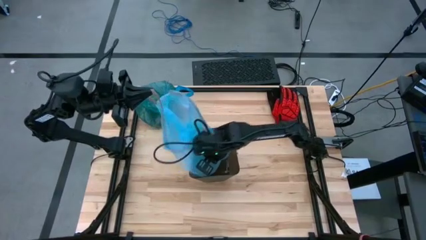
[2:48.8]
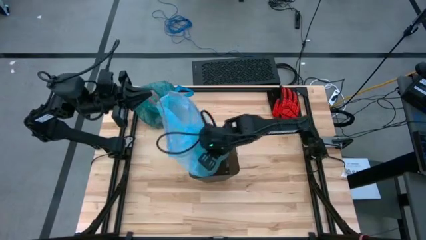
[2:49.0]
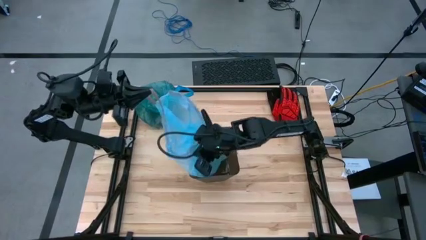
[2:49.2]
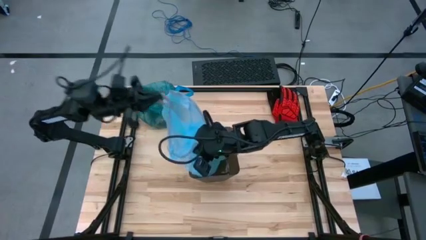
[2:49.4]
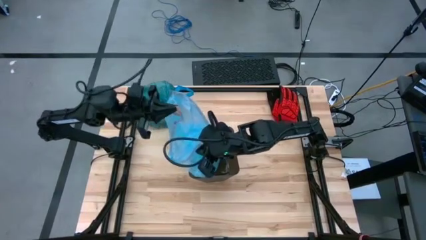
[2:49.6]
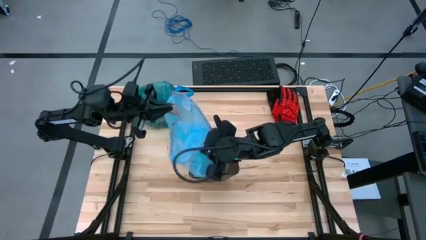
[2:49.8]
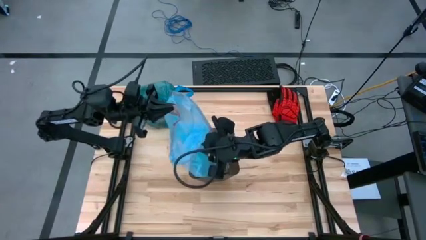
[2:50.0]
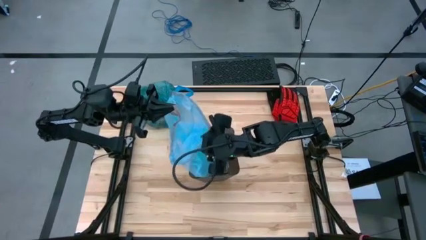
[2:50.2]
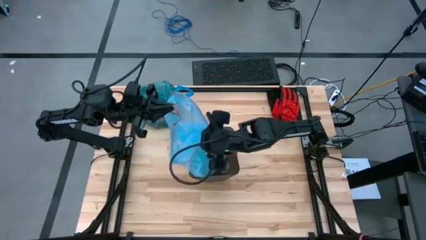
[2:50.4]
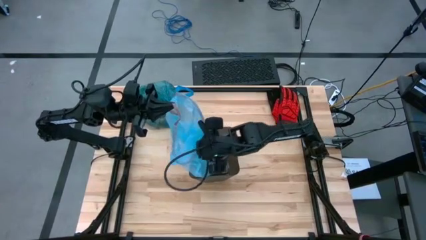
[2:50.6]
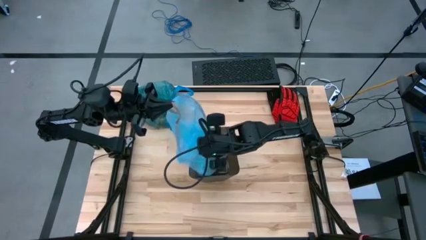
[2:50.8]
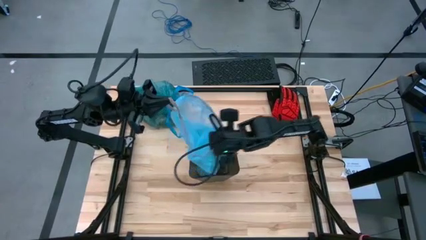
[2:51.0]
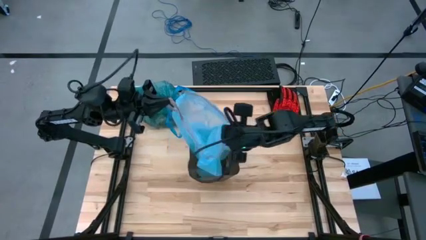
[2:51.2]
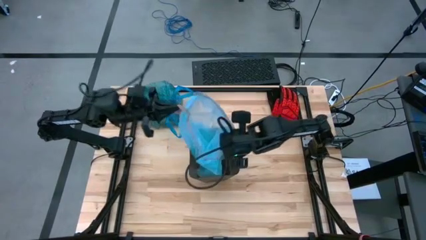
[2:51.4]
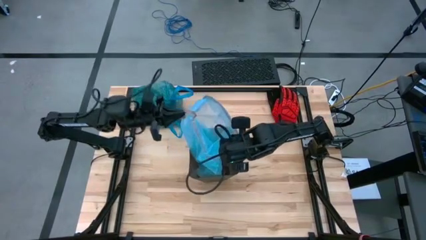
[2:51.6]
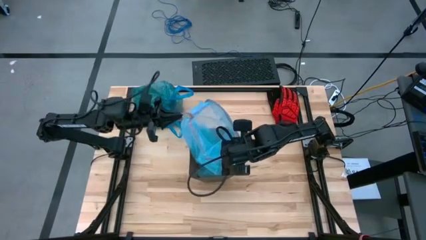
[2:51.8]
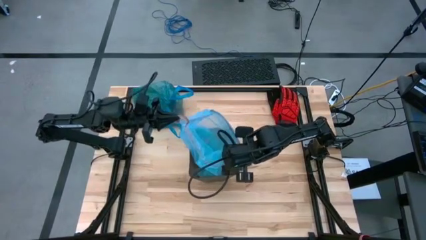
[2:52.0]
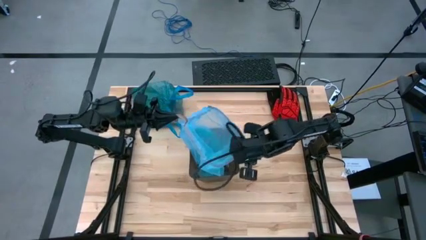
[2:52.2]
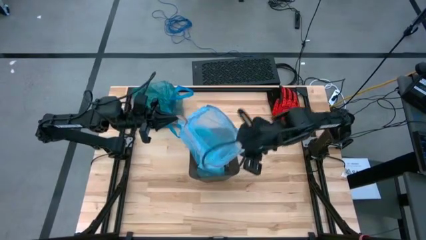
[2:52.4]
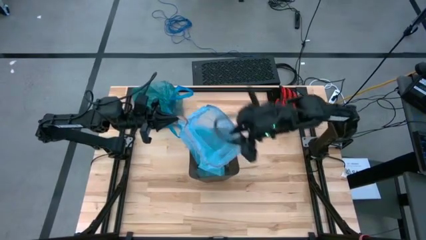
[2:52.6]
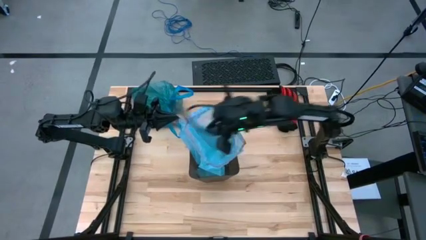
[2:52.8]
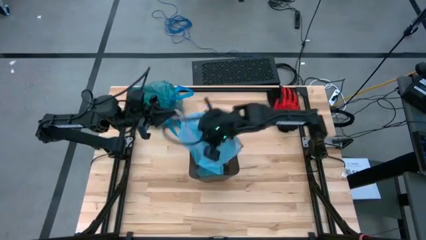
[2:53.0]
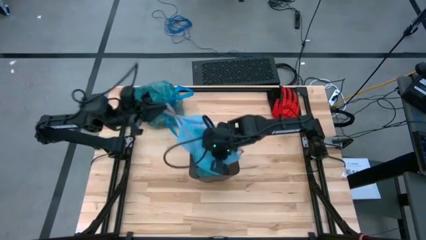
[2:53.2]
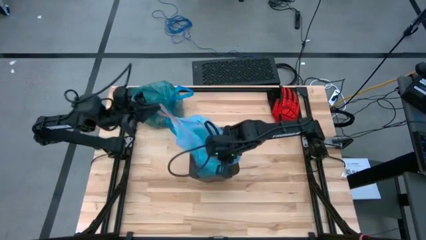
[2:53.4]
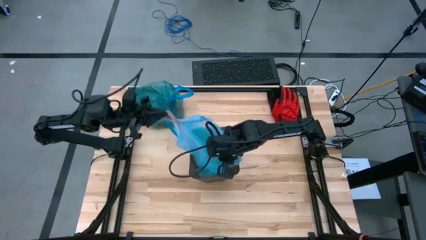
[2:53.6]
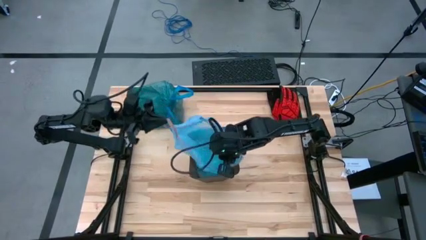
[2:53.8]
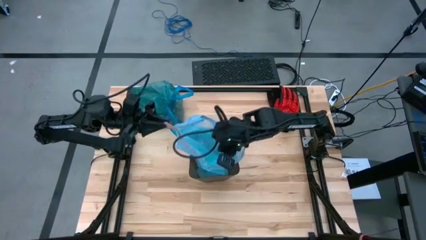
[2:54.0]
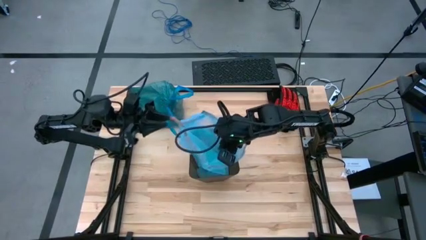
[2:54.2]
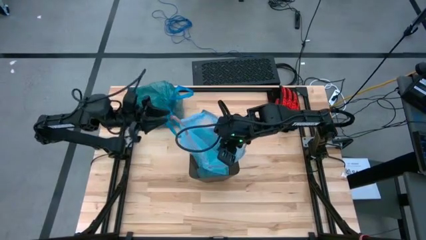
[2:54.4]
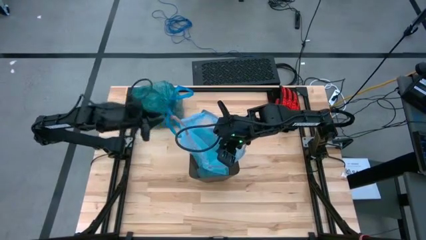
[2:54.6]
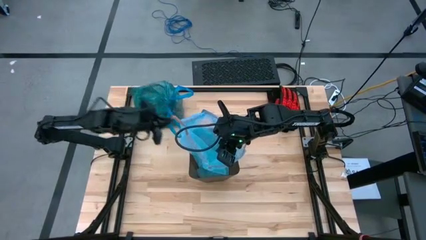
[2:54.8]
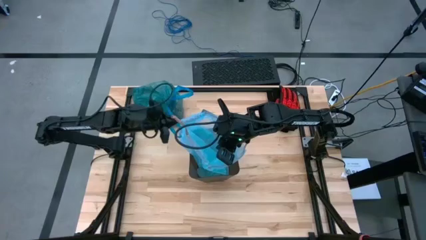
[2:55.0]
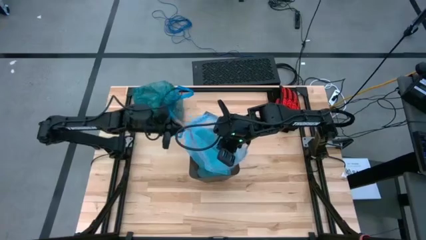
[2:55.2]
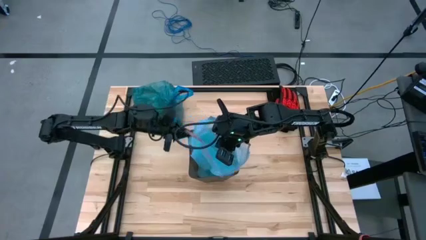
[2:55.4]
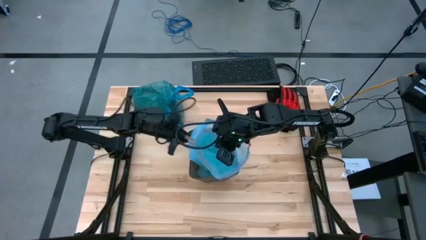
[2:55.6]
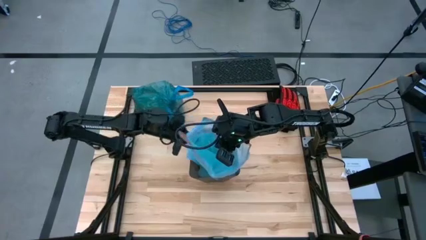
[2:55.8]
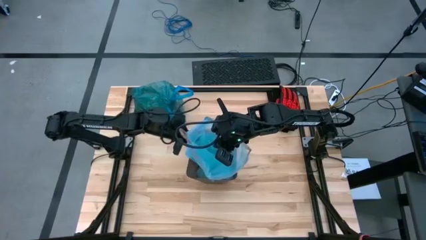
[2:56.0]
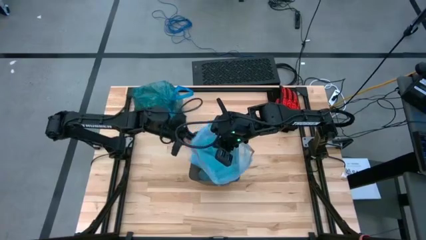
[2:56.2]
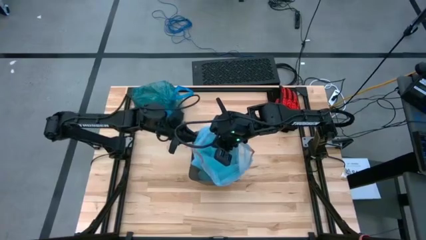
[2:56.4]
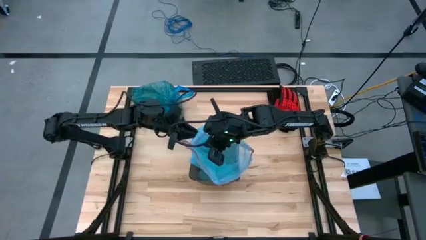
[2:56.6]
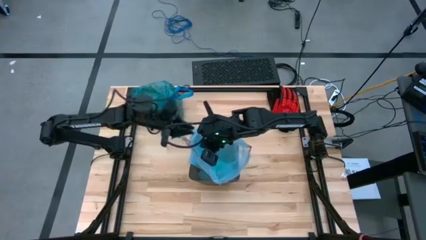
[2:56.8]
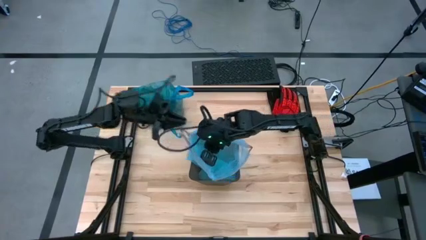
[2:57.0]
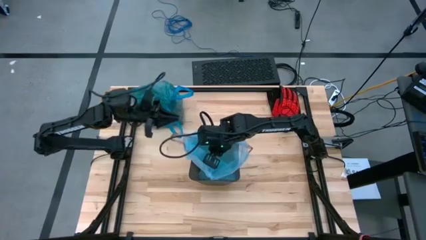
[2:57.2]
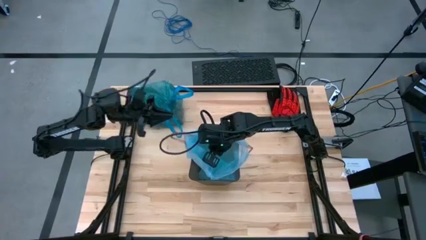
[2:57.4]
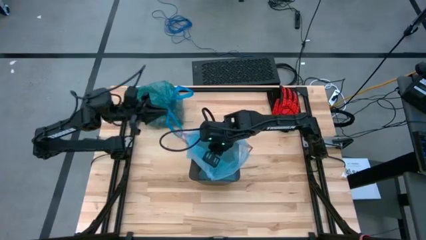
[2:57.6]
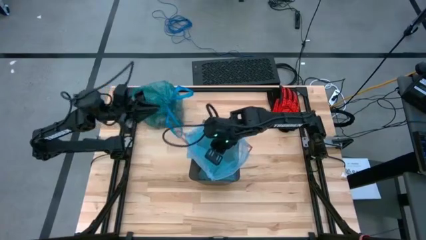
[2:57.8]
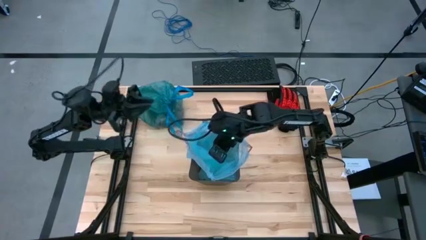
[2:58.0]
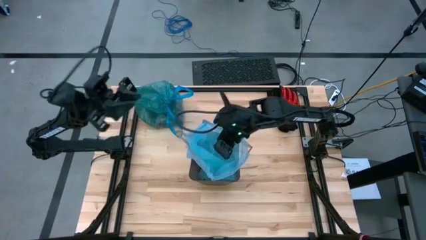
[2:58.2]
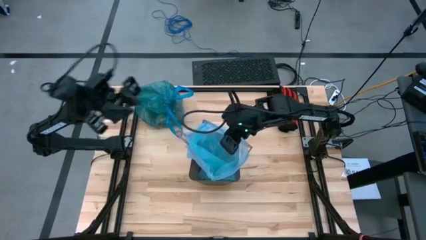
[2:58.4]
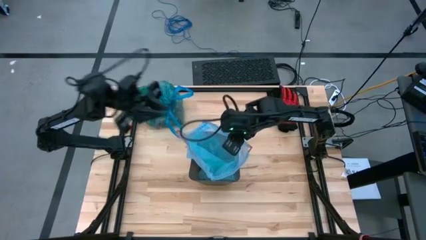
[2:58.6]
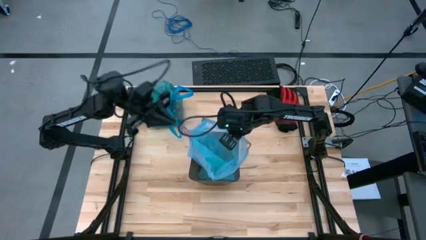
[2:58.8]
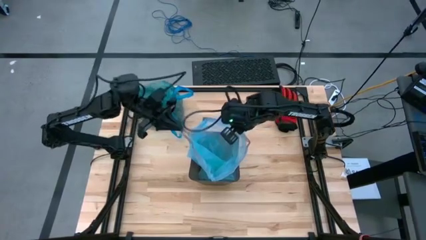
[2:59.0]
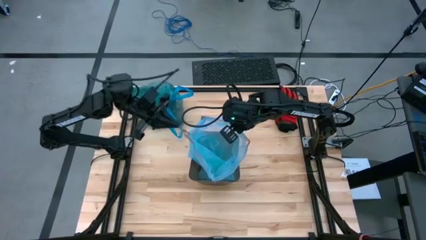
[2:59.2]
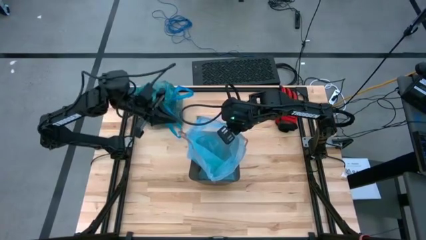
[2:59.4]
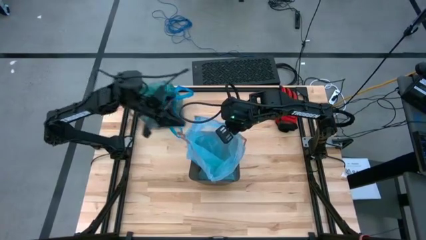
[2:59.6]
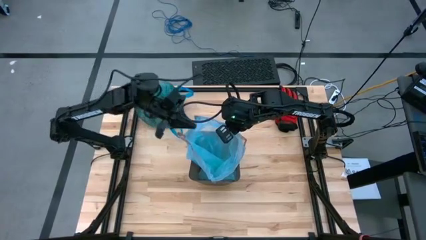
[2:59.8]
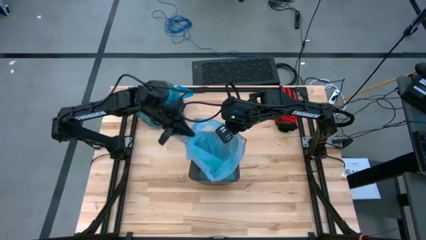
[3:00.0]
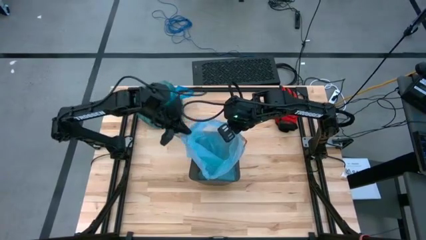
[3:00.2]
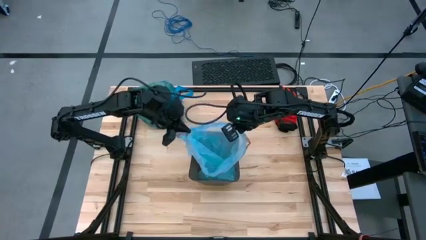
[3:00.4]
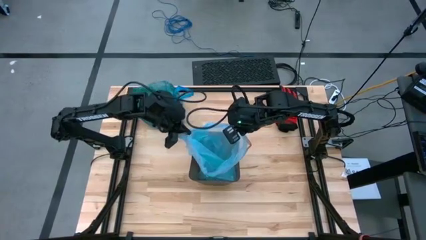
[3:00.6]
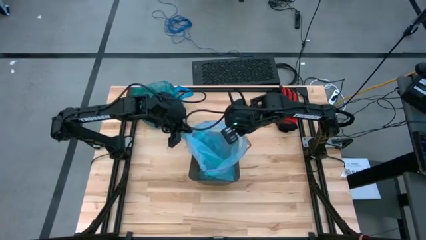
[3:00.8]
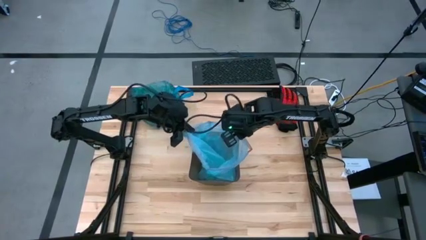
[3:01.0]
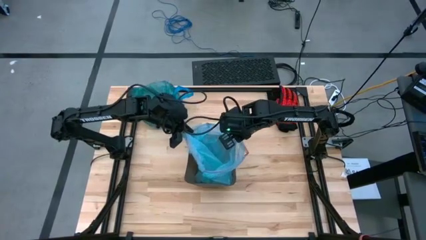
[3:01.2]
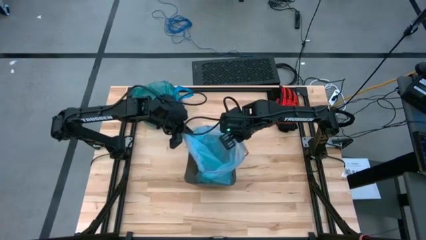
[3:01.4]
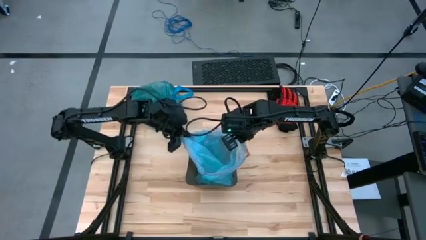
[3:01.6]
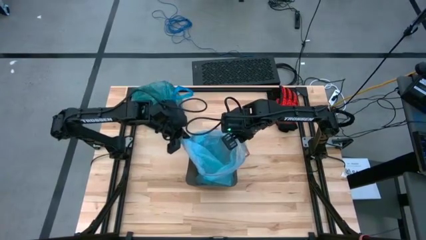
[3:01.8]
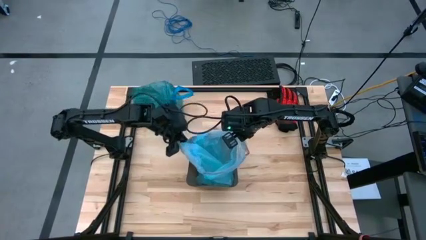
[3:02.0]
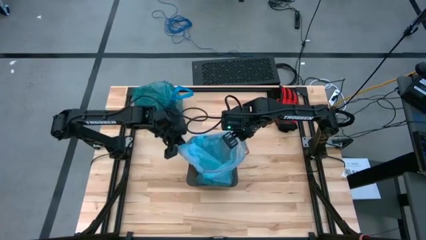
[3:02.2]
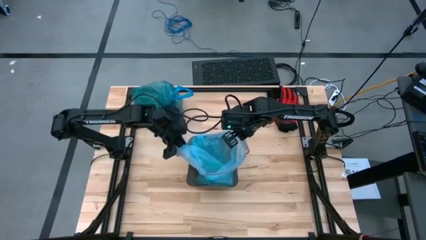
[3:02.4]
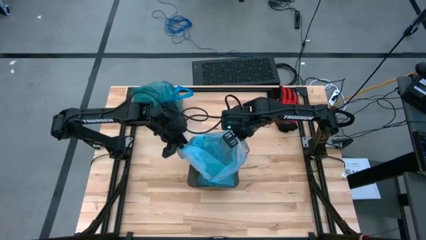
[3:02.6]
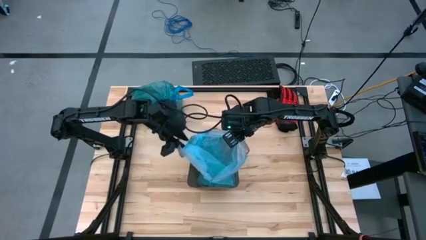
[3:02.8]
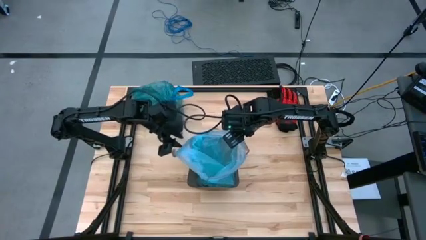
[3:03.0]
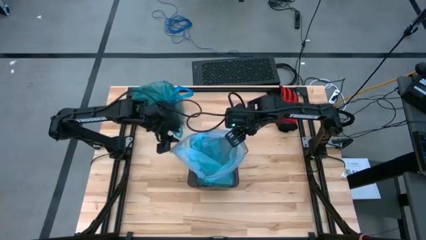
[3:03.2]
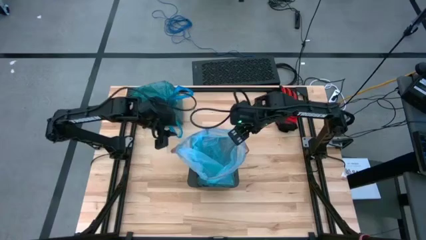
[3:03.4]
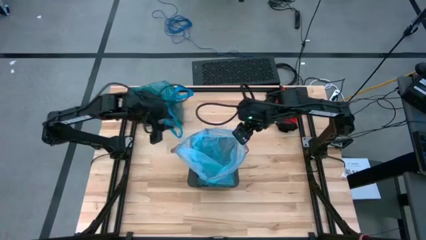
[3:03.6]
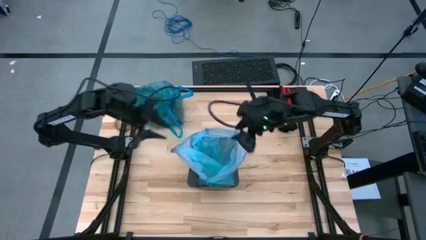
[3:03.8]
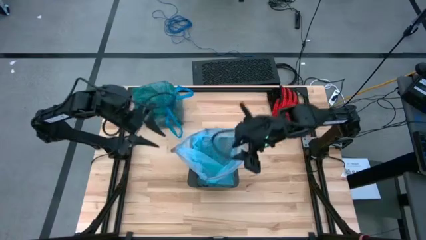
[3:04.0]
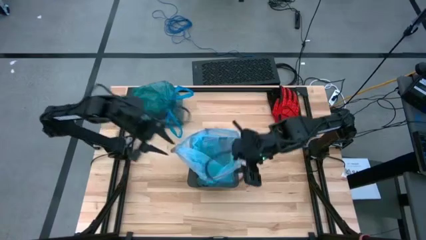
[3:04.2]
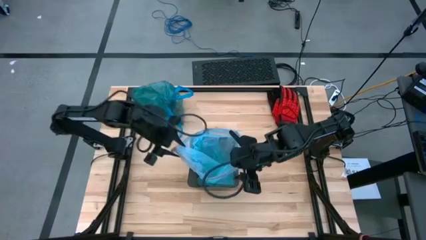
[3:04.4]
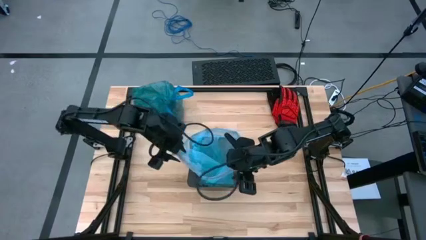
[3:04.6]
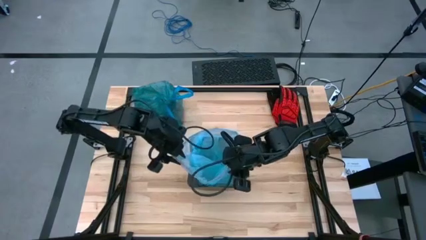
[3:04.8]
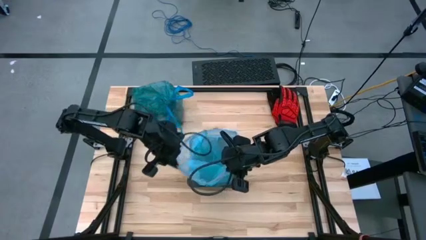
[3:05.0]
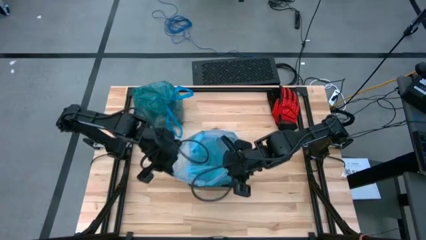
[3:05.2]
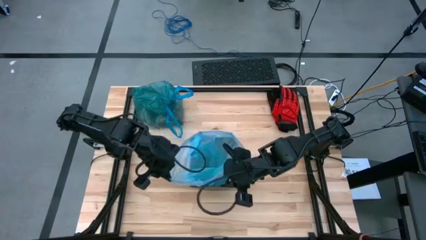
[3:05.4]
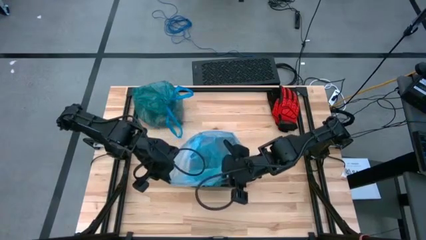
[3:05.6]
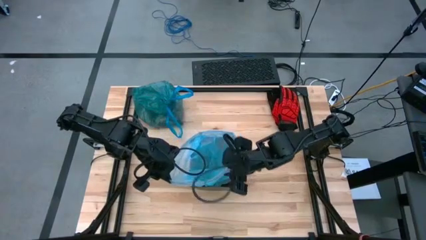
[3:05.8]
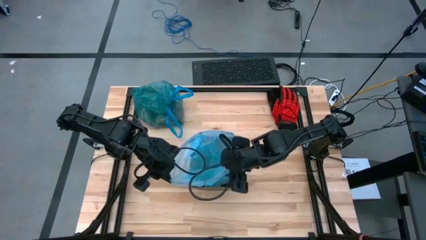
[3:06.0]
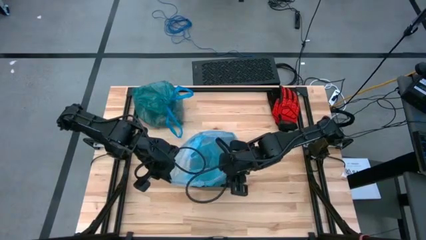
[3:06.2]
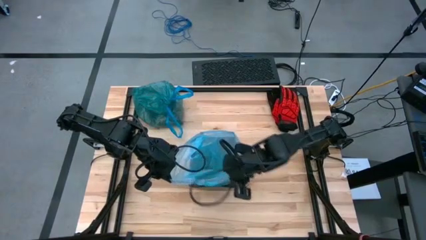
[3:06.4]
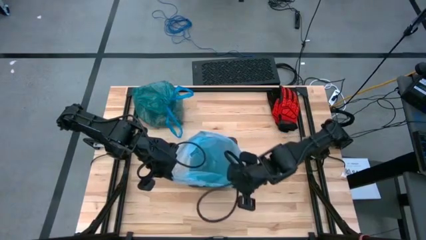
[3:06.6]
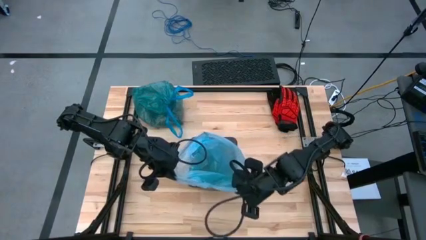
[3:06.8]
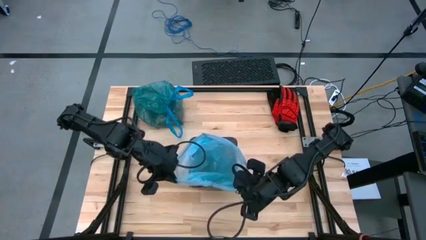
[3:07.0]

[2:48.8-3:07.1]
Task: place trash/remove bag and relplace
Insert the new blue trash bag into the trash bin
